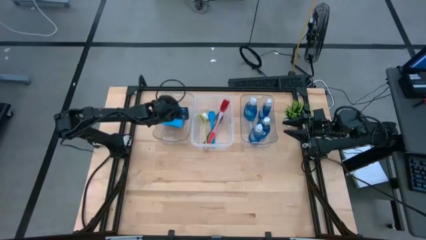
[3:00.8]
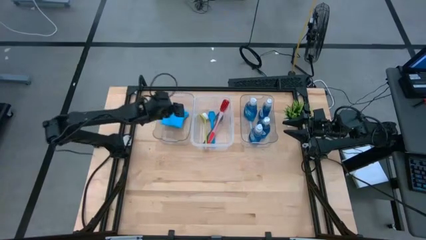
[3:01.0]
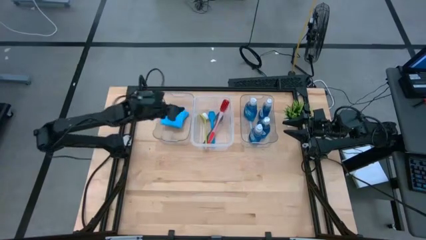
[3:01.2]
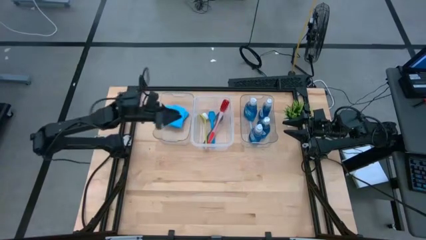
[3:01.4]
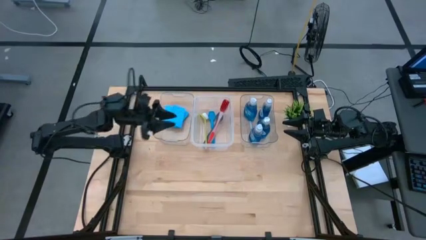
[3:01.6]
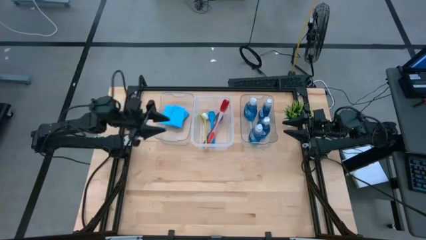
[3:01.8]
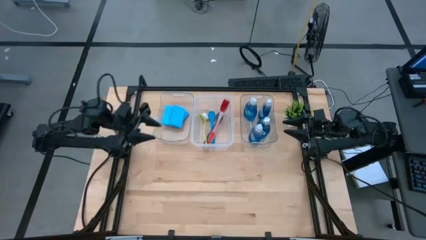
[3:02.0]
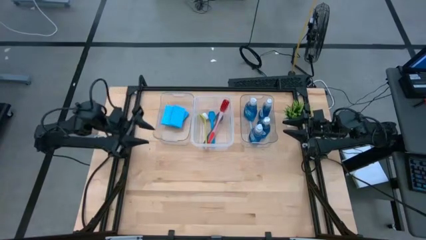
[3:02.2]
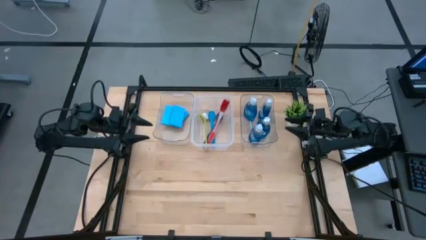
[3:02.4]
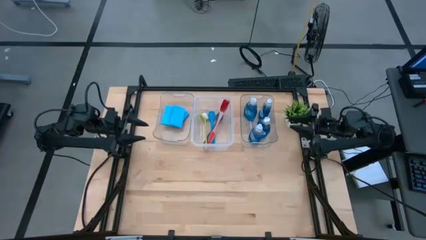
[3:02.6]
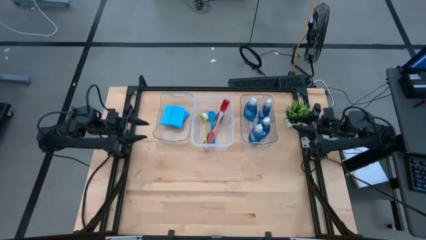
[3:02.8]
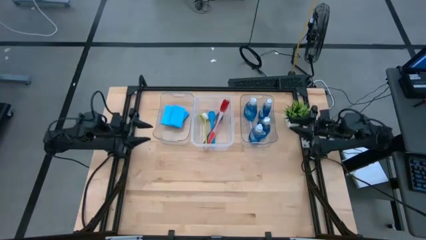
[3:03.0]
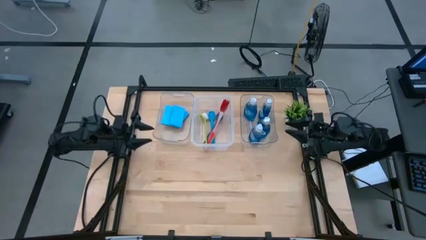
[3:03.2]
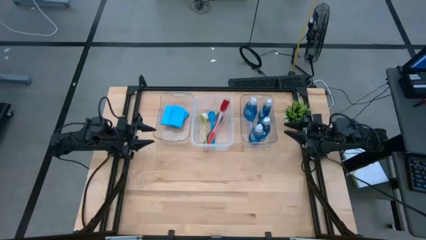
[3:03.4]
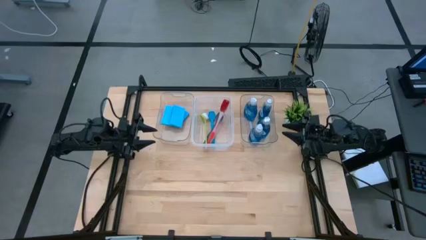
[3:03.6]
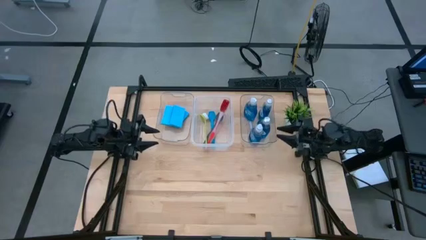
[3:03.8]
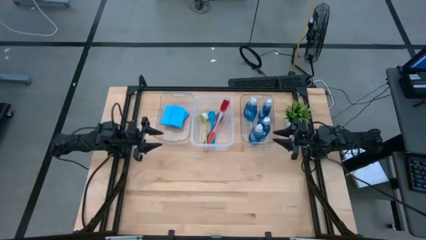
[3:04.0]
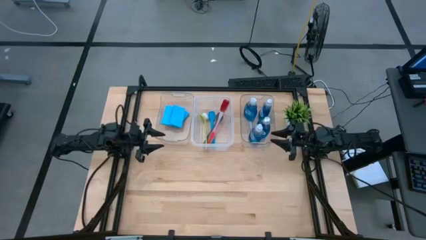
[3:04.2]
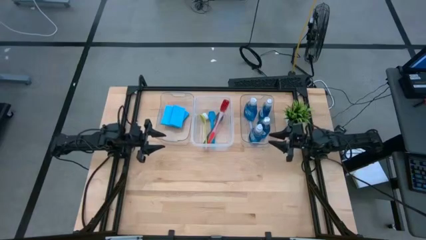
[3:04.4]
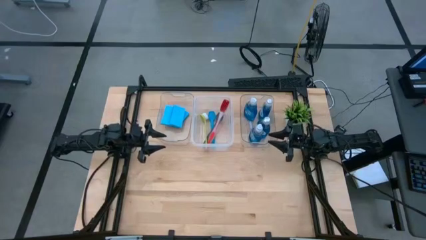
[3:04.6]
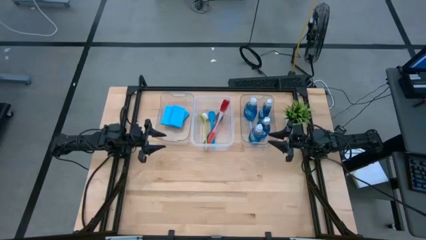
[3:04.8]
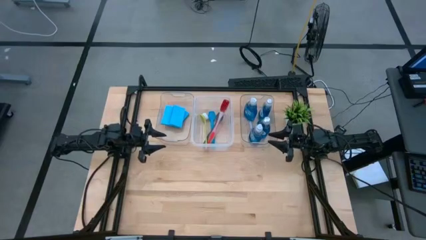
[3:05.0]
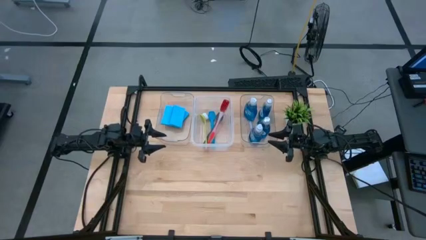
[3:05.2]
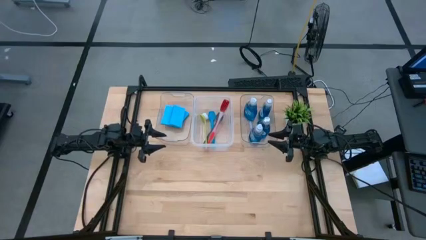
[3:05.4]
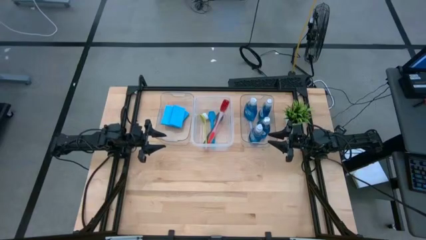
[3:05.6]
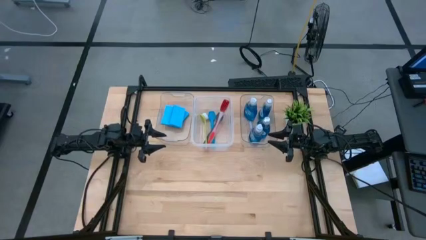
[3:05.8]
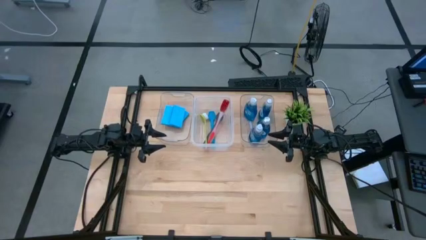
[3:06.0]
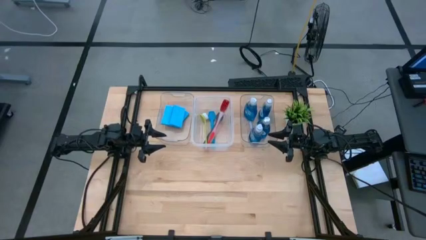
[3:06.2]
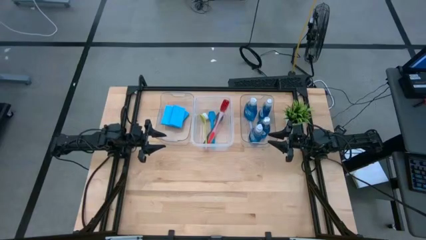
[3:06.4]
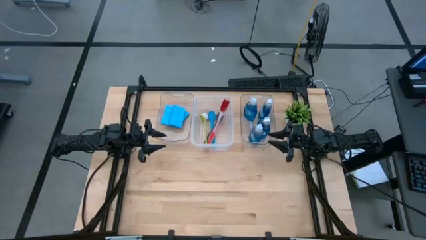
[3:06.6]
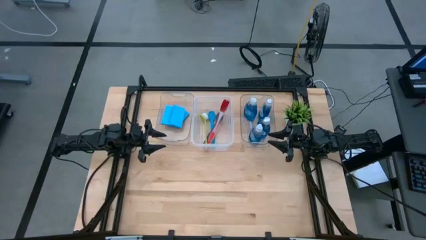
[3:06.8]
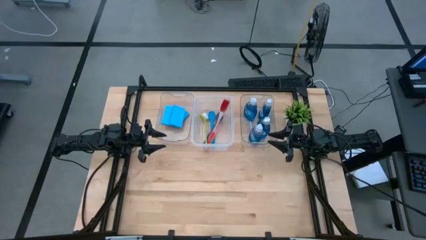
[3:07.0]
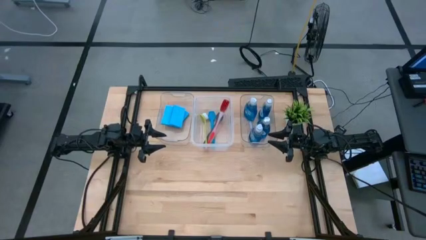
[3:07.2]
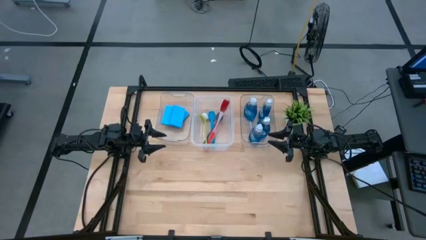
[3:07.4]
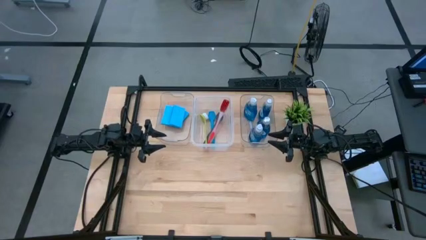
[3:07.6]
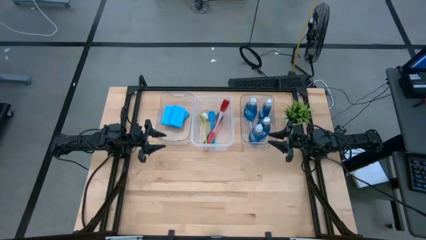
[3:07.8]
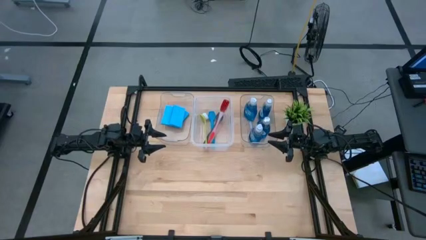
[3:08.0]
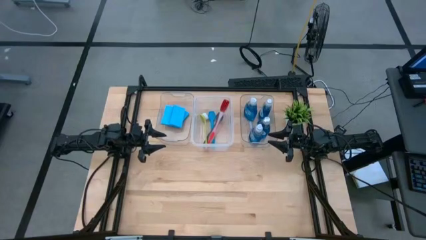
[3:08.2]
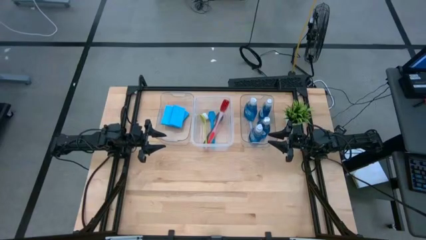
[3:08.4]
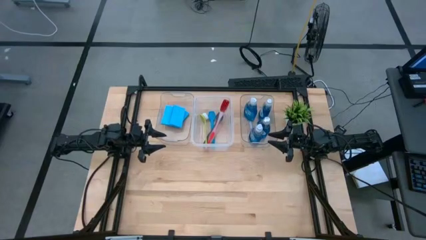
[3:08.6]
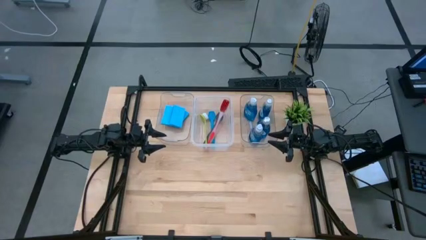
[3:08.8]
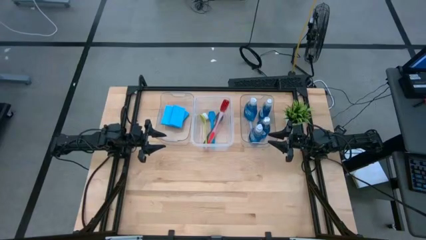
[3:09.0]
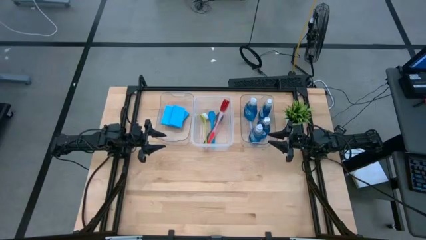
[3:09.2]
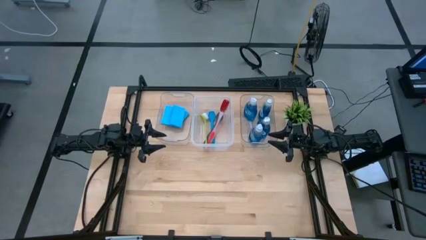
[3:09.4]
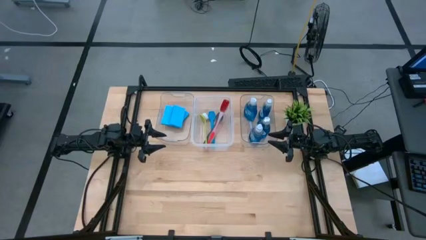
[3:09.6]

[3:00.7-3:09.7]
Task: Pick & Place Kitchen Sink Supplies
Return to Home Position

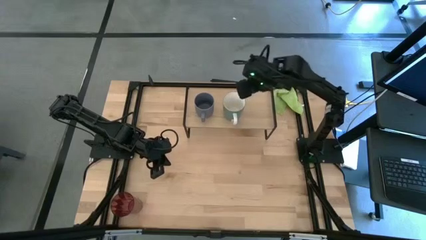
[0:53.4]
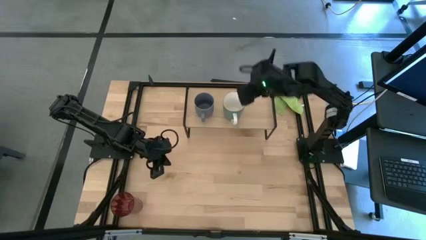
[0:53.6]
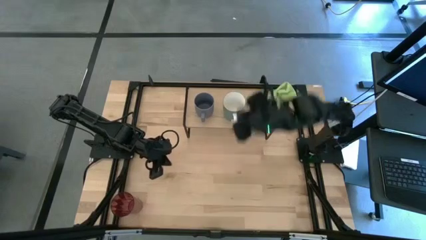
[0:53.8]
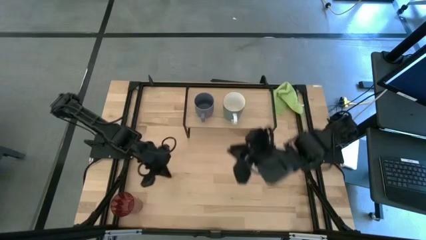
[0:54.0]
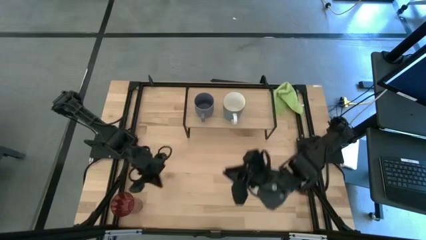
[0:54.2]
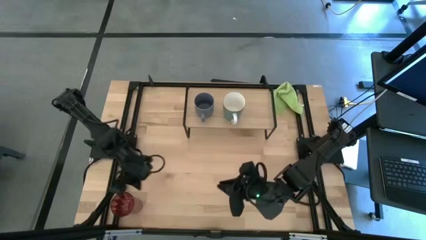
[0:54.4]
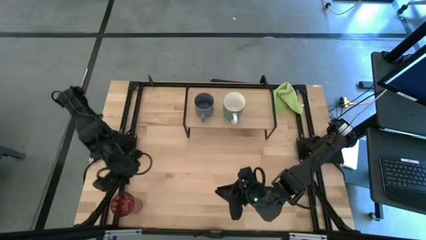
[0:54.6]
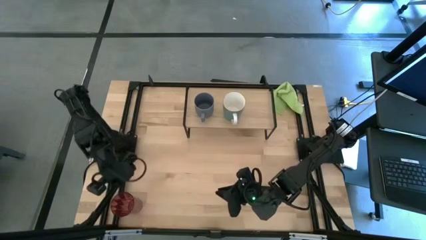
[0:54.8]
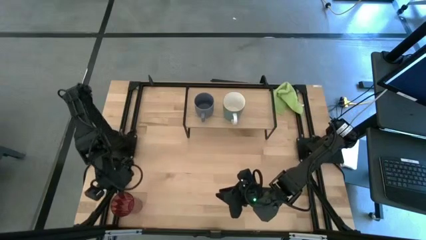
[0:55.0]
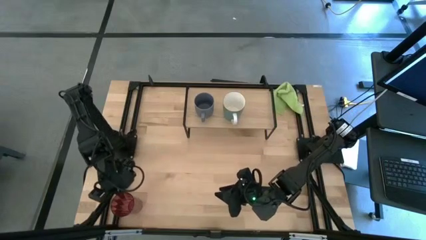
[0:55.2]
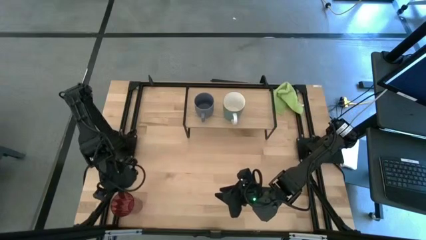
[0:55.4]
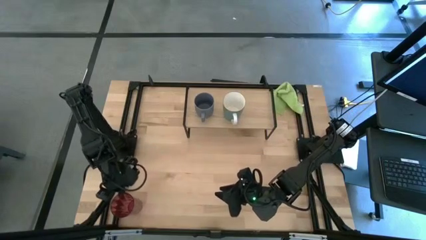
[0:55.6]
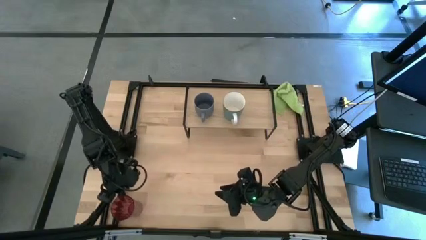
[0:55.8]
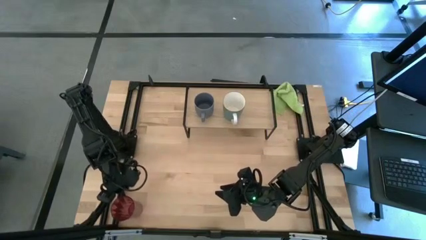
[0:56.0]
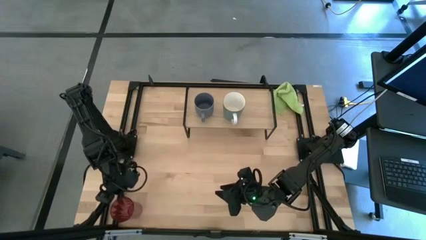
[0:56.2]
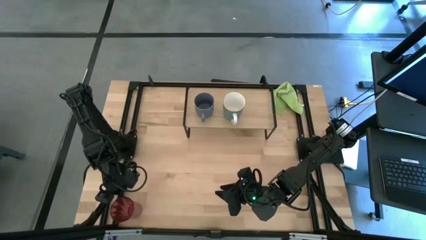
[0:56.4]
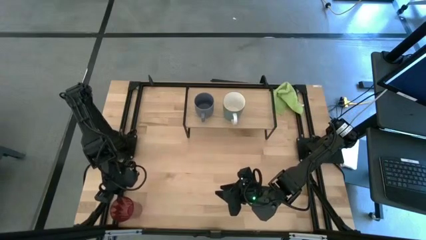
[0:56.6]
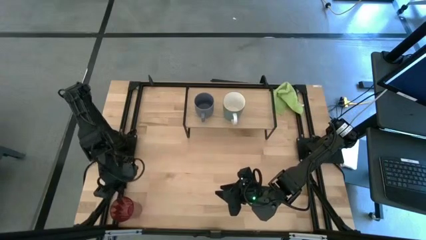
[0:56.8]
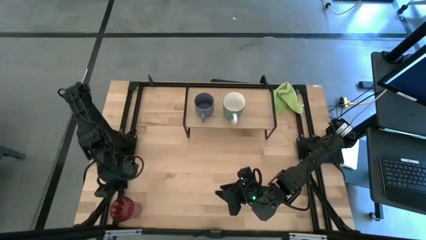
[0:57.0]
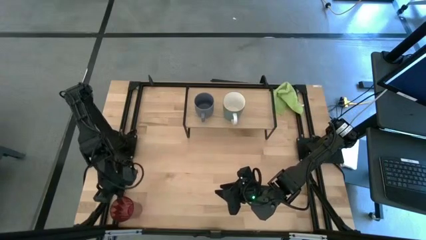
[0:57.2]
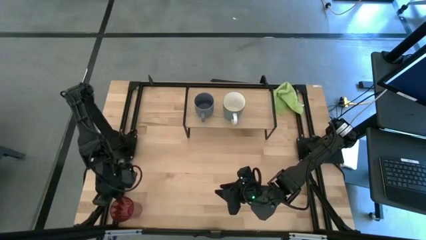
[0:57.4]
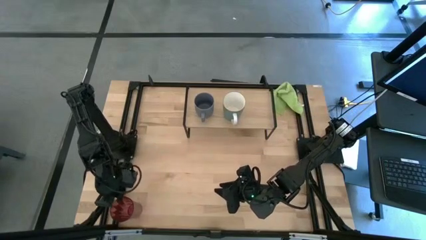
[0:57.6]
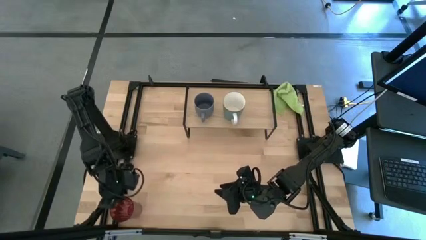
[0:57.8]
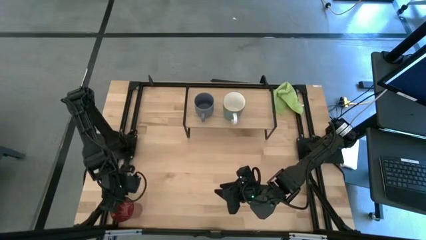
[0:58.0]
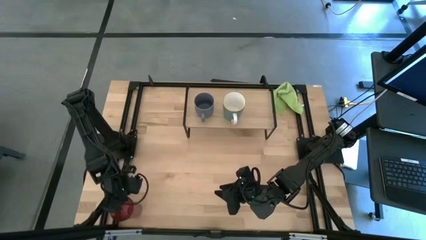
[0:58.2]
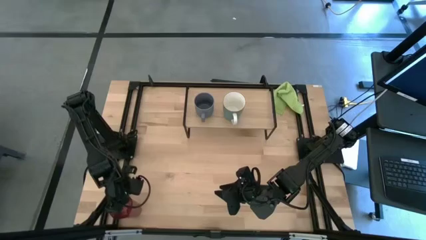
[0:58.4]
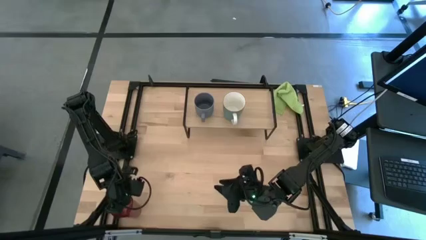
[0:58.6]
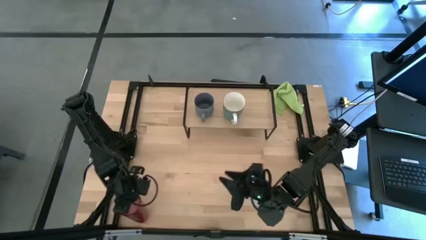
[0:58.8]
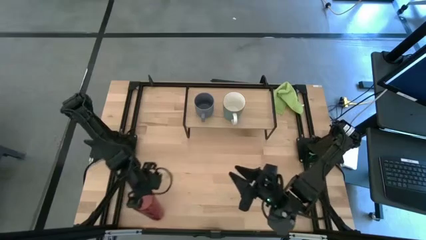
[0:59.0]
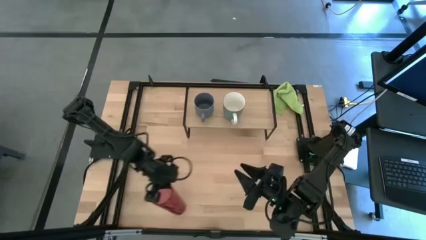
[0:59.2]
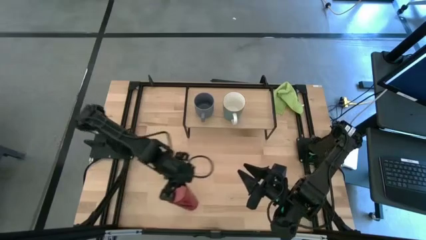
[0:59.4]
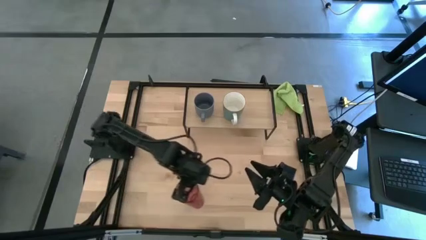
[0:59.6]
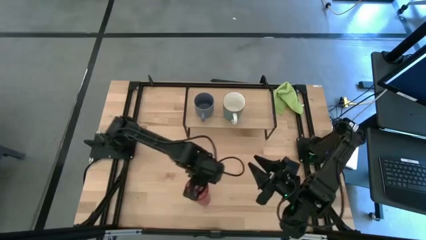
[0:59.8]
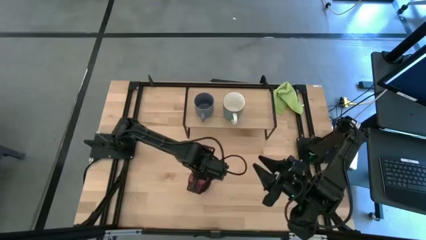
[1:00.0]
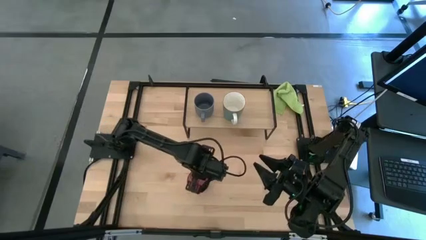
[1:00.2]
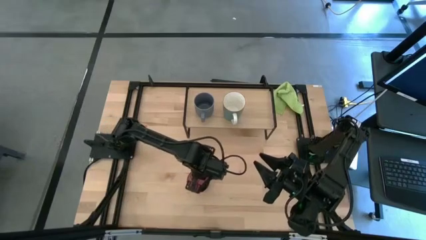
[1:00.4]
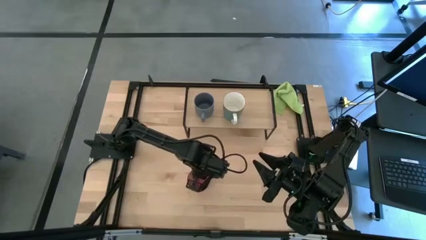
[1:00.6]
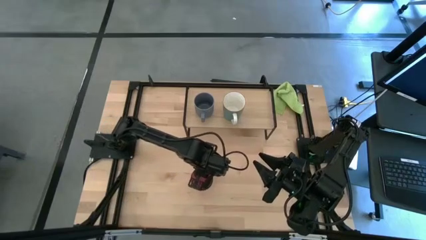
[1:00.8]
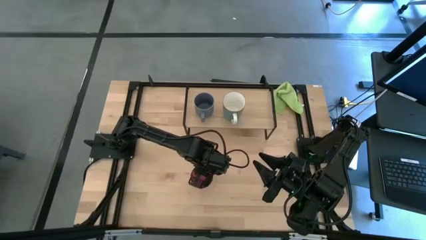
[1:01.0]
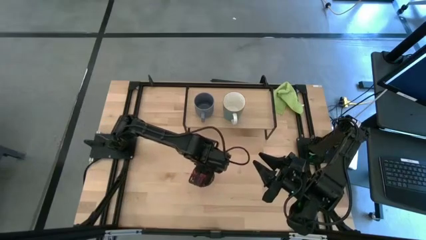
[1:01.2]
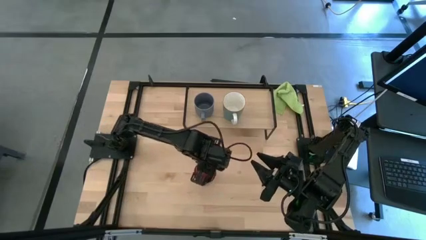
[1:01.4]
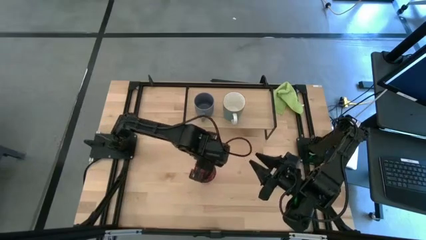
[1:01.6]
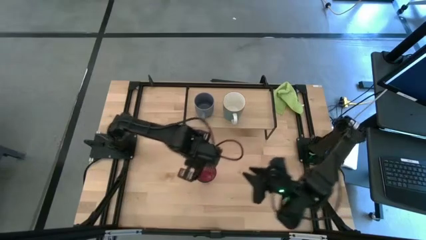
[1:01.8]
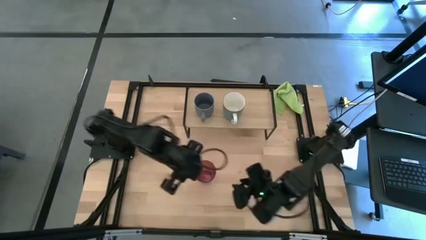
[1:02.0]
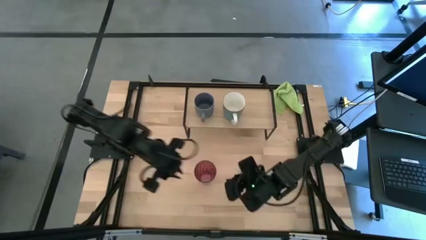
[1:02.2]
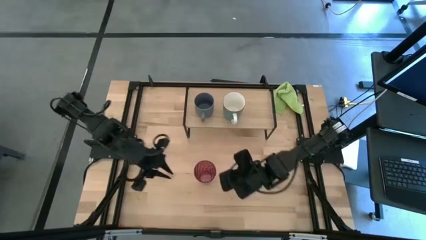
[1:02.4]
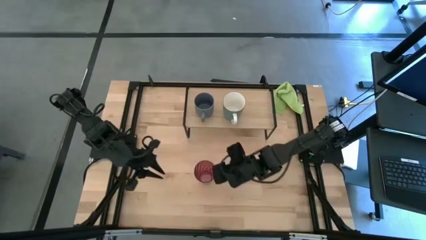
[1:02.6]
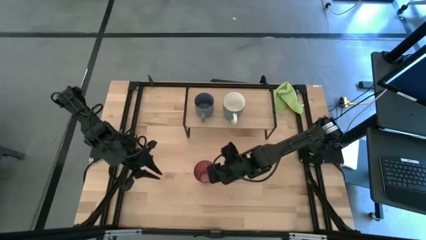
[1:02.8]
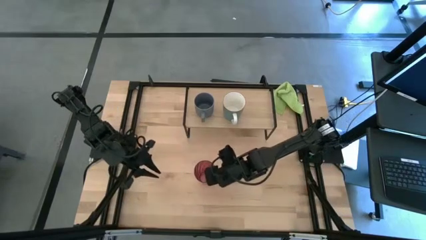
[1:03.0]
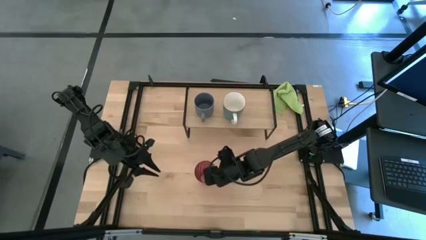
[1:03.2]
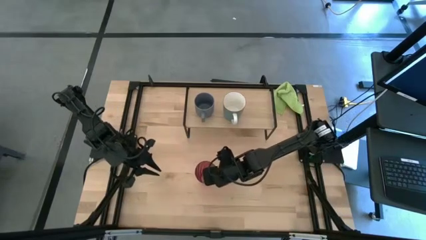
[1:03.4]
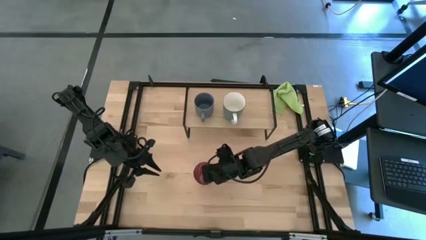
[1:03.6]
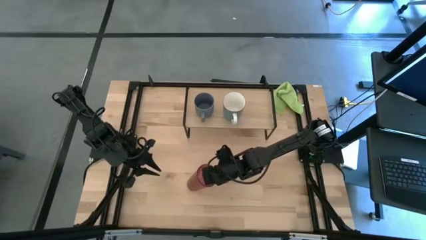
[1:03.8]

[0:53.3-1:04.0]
Task: Stack small to large cups/mugs on shelf
Put the purple cup on the shelf
